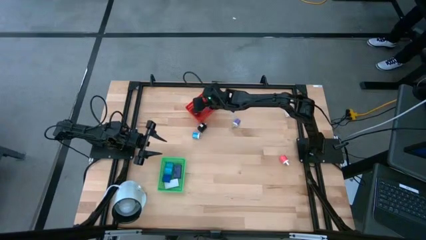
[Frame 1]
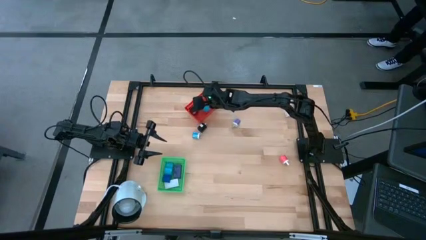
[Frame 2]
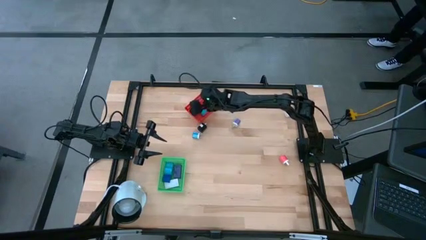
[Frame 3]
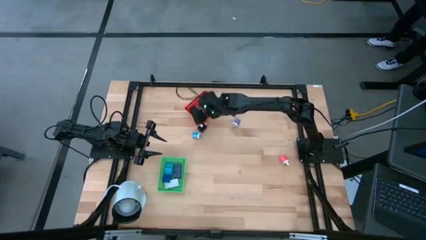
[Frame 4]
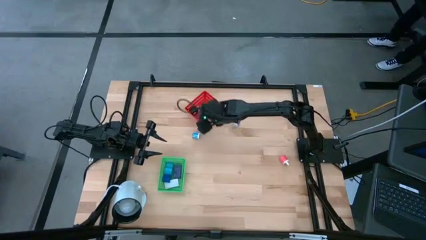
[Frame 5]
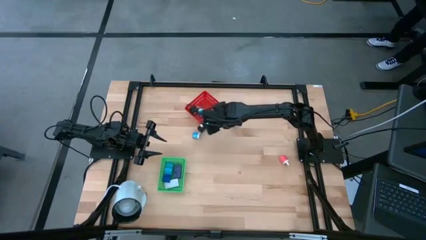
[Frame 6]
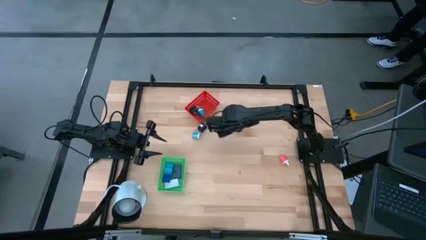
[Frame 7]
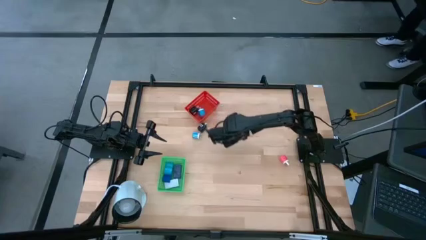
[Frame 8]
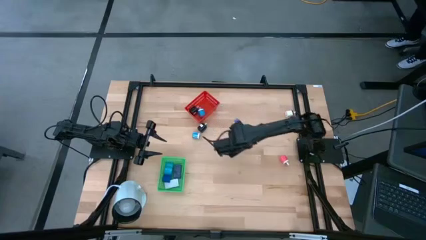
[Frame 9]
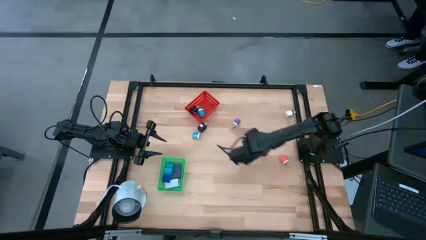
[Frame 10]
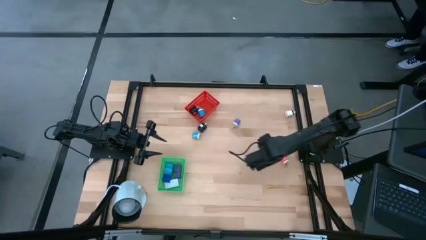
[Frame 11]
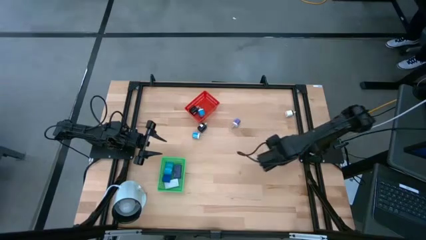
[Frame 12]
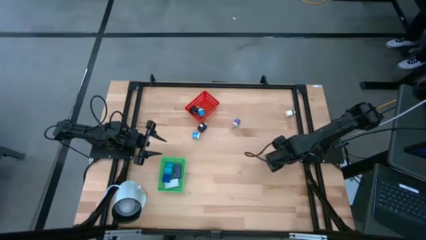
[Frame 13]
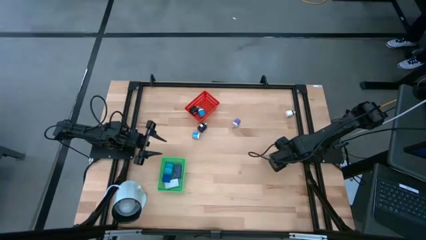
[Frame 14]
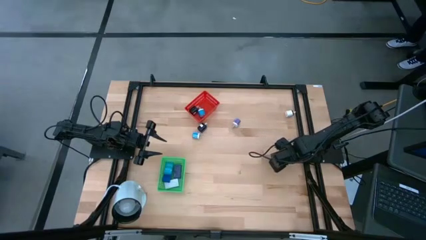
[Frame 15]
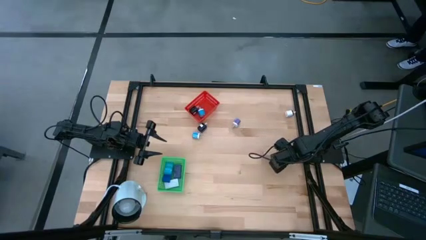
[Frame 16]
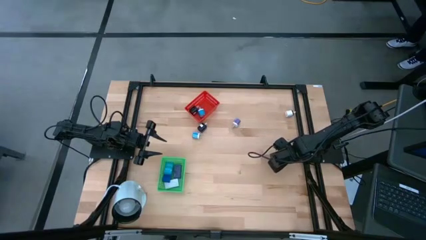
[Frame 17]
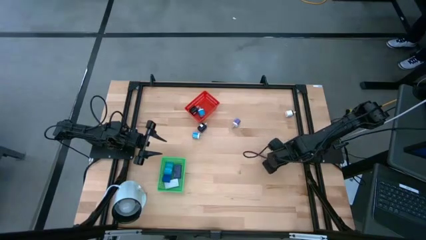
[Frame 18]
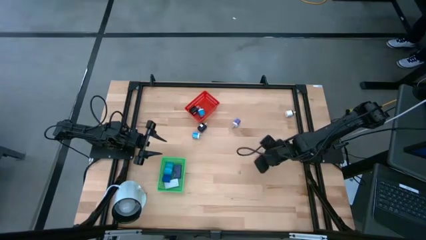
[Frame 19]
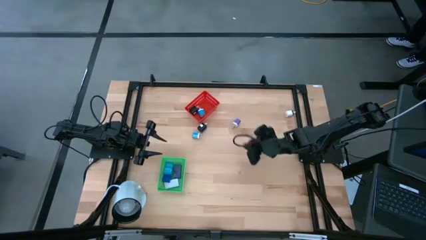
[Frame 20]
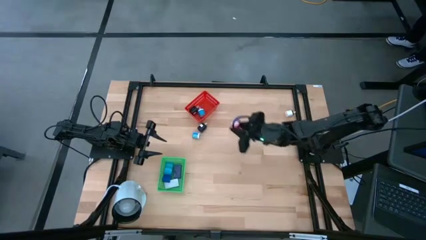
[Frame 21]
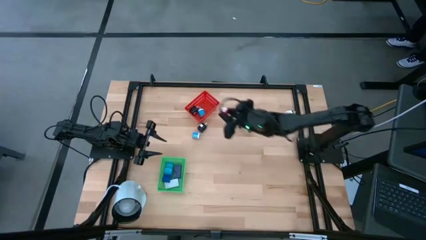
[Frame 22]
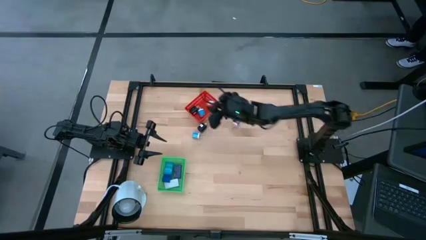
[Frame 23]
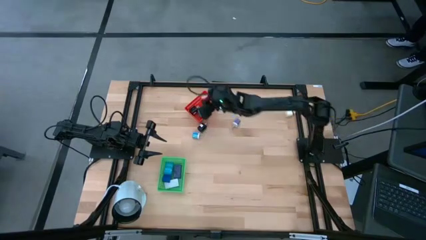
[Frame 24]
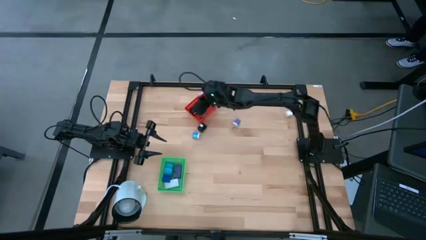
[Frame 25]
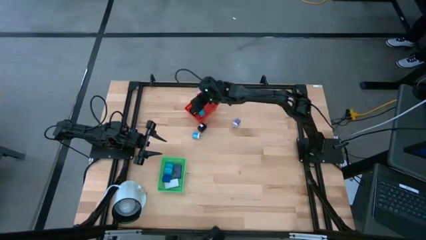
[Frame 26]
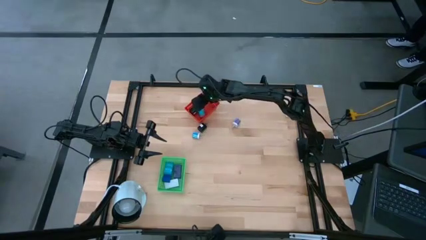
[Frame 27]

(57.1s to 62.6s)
Task: Pick & Place Office items
Put the pink charger adapter into the red bin

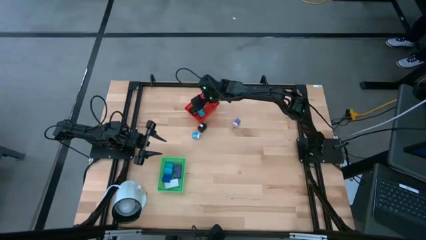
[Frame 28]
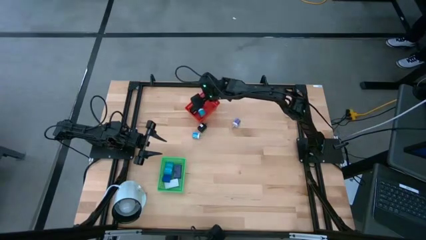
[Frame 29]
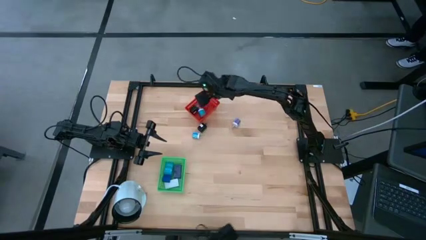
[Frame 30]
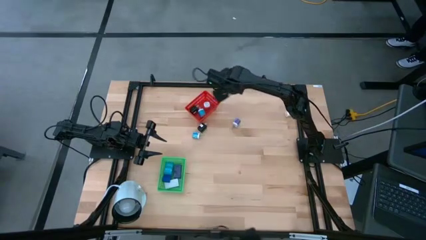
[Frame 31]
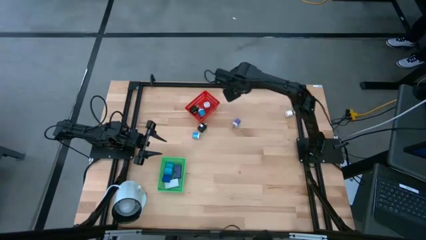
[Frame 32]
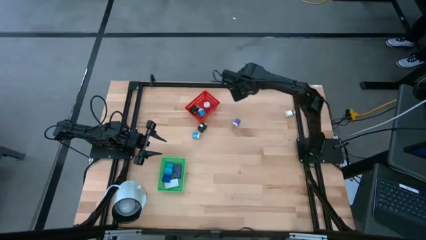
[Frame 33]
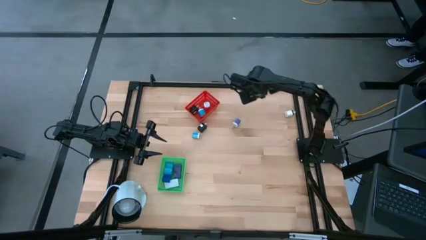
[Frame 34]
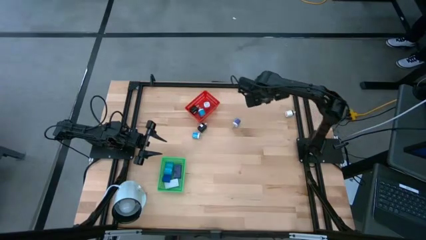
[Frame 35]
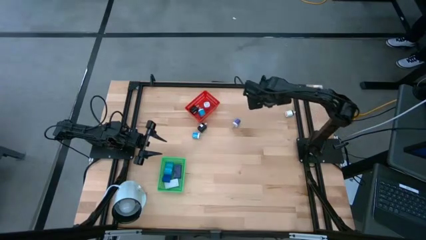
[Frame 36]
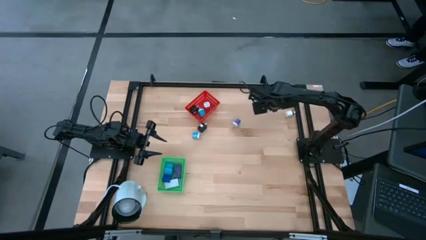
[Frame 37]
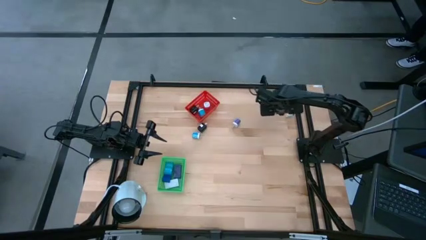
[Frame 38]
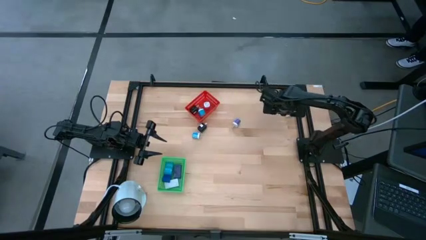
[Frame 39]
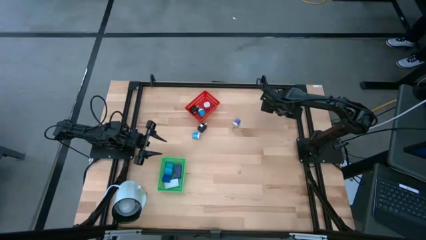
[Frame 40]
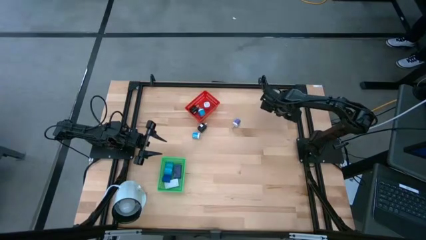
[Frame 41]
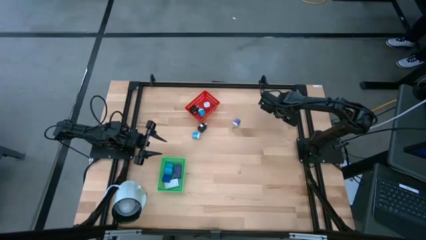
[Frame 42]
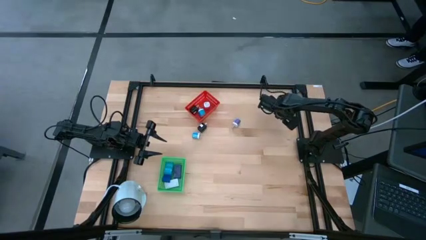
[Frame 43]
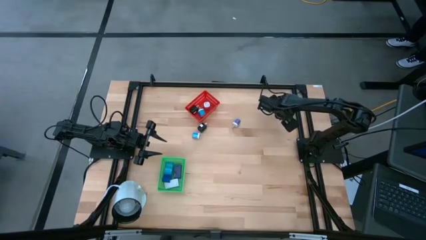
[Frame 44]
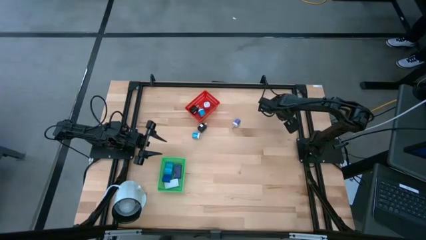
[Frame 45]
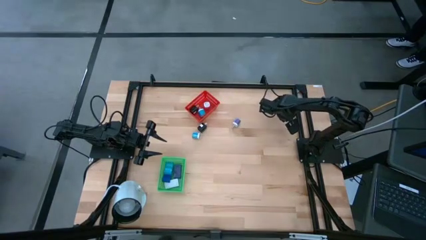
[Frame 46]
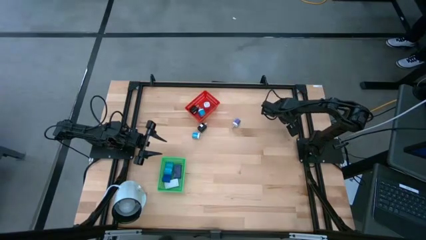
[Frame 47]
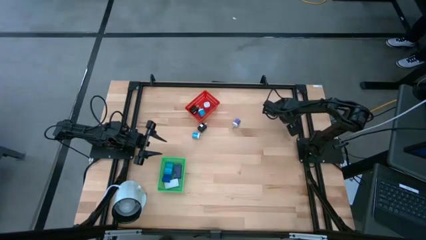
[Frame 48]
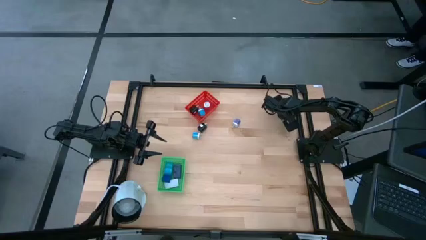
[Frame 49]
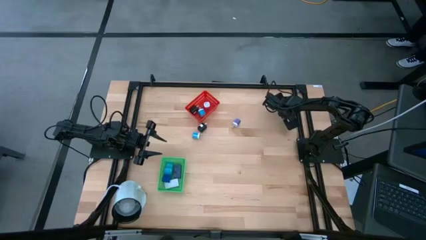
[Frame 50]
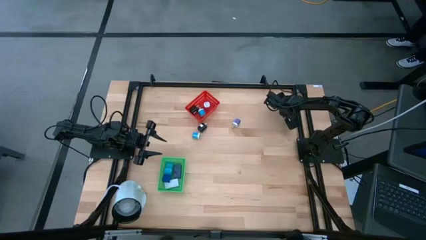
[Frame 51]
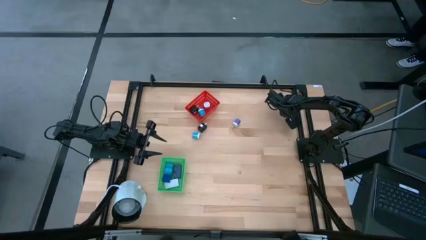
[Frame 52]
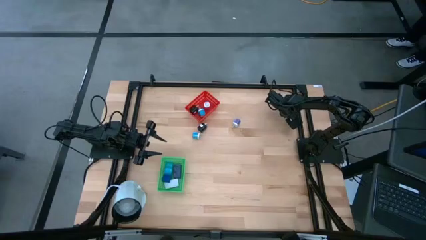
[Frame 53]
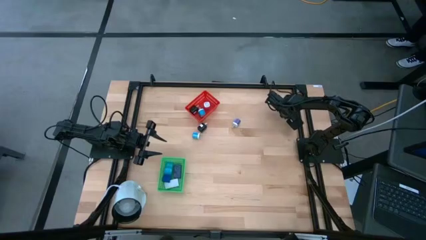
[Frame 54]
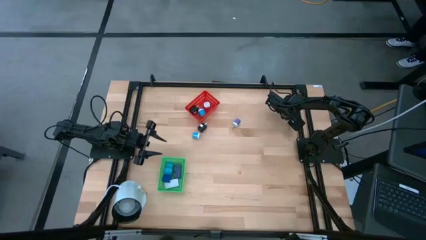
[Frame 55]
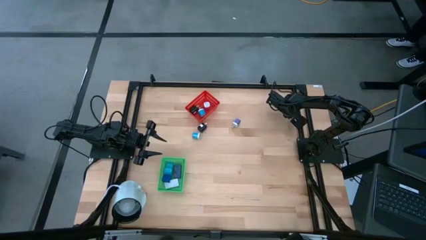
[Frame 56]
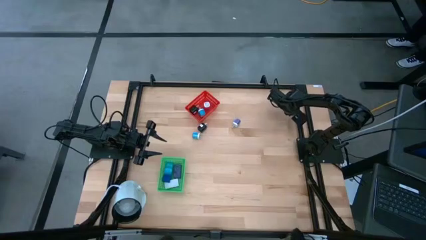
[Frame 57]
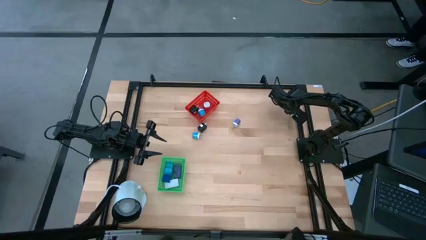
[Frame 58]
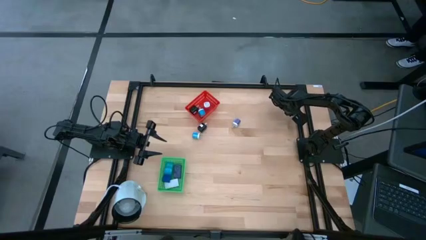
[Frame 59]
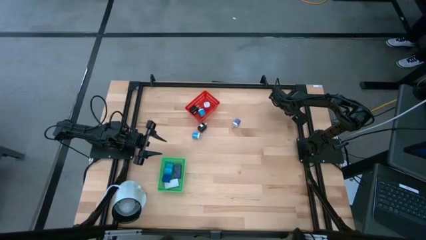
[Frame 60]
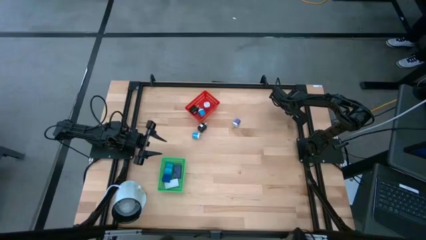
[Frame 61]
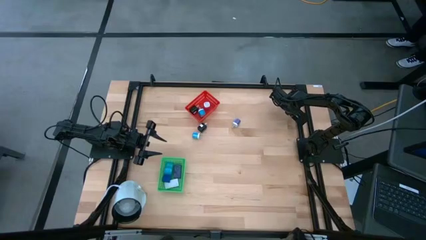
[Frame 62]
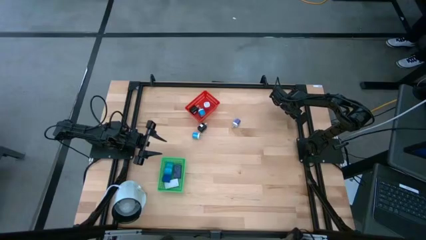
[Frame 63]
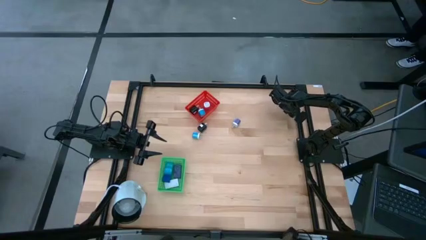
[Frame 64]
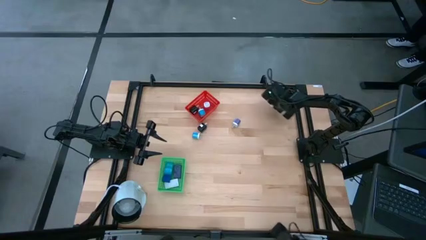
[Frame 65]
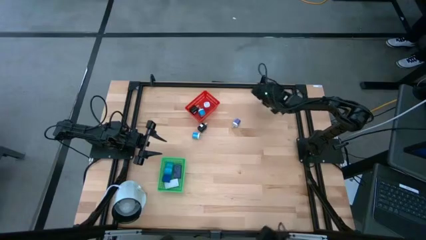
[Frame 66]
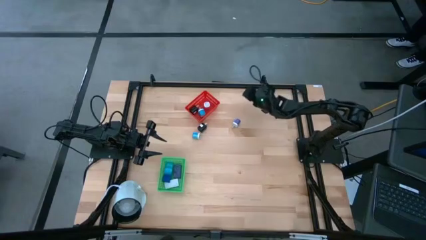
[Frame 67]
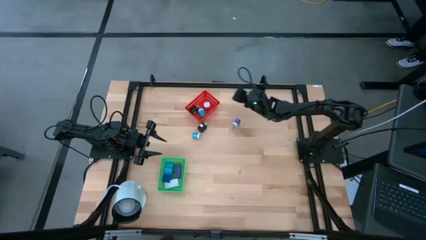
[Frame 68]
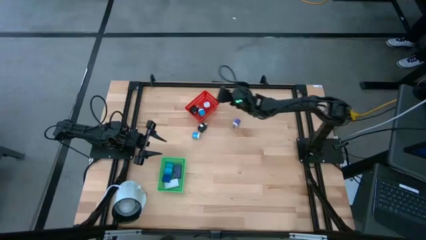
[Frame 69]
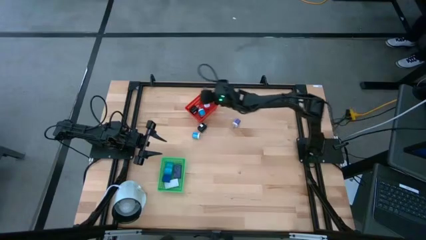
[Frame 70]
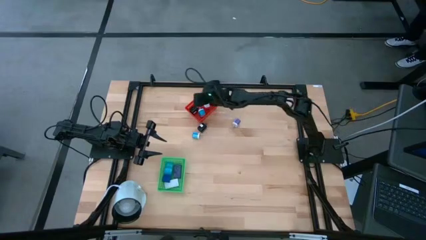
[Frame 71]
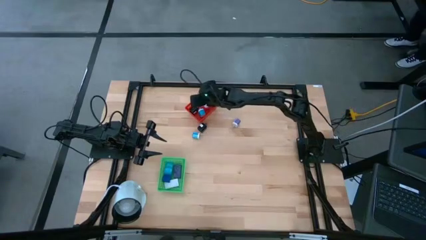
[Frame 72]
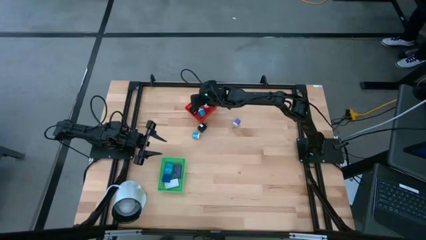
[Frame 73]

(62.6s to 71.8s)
Put the white charger adapter into the red bin

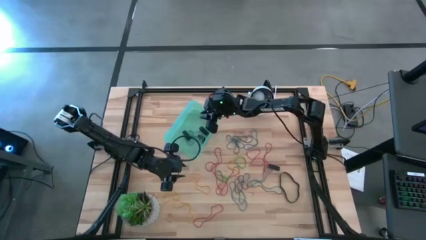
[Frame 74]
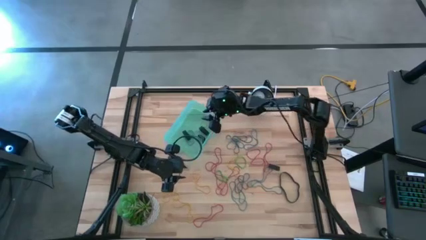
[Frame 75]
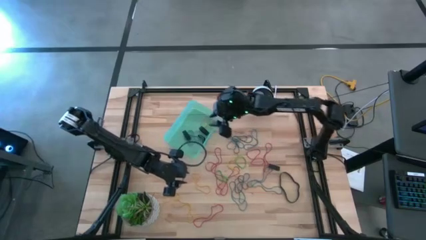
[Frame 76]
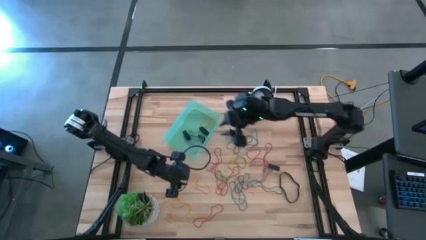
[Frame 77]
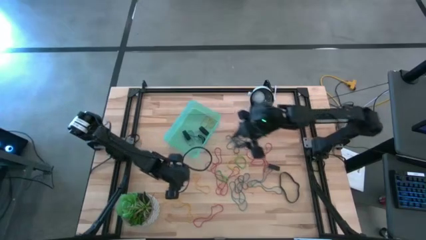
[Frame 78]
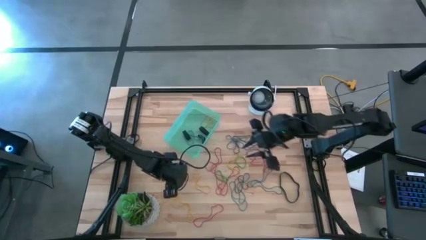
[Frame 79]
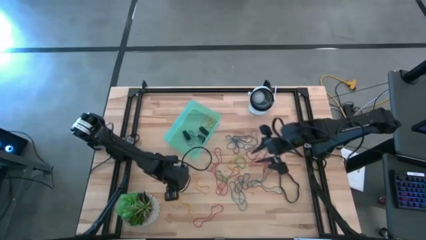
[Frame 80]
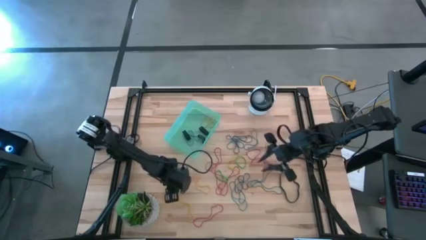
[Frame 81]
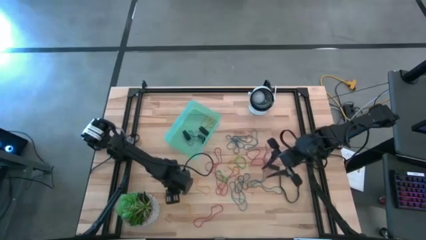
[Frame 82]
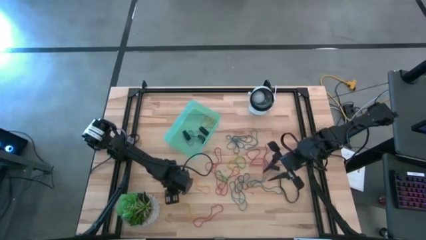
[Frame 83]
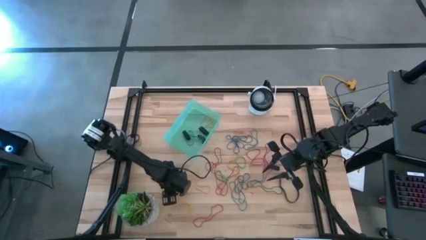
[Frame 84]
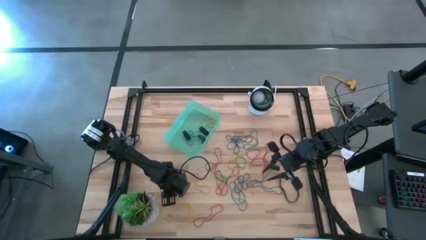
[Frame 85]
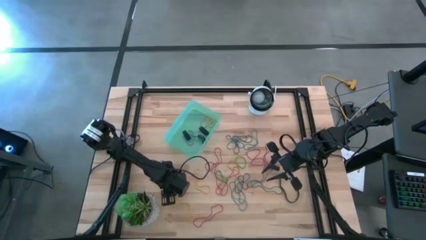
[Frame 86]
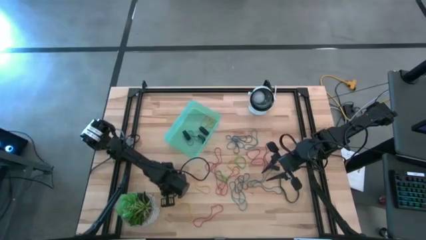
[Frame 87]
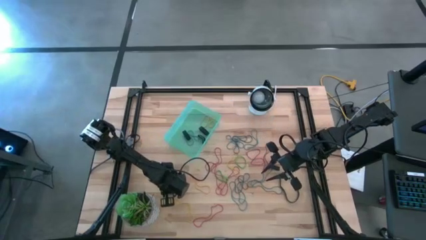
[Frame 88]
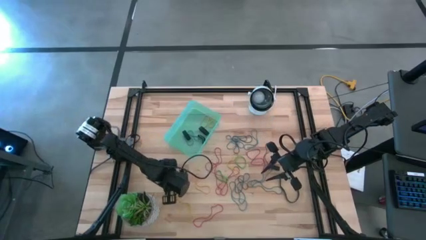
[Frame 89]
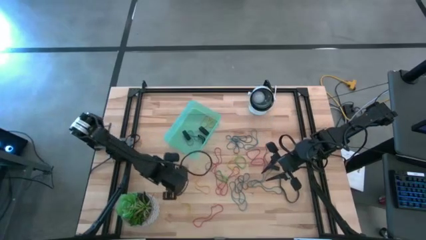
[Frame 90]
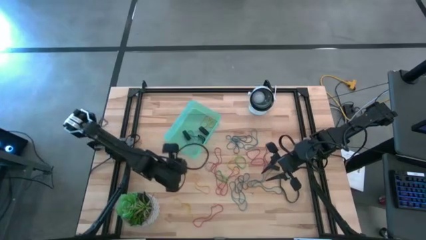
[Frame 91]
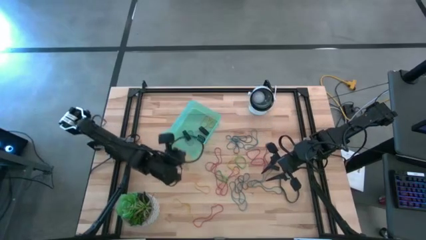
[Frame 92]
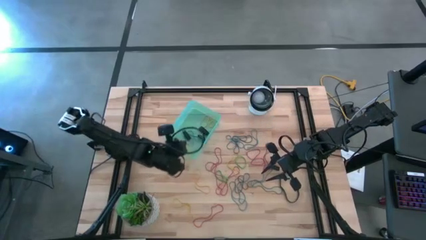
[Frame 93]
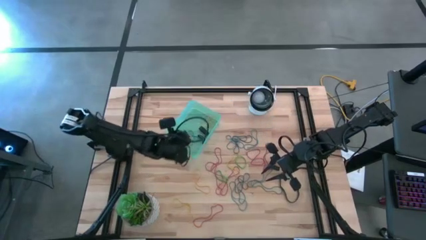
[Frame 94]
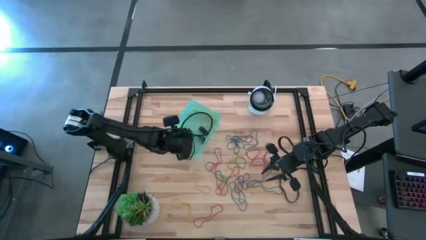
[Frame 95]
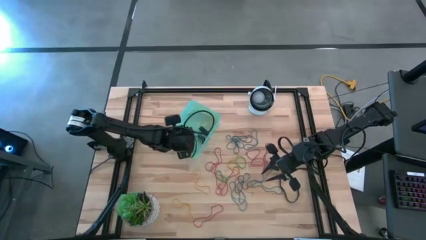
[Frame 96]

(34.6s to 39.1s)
Task: Pick and place rubber bands into bin
Put the yellow rubber band into the green bin
